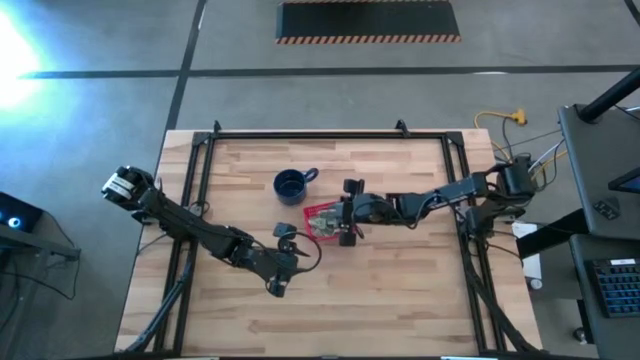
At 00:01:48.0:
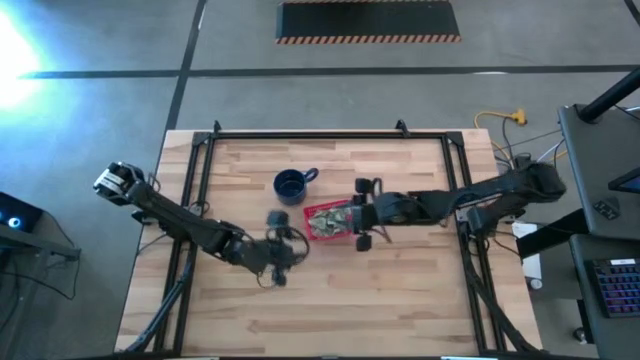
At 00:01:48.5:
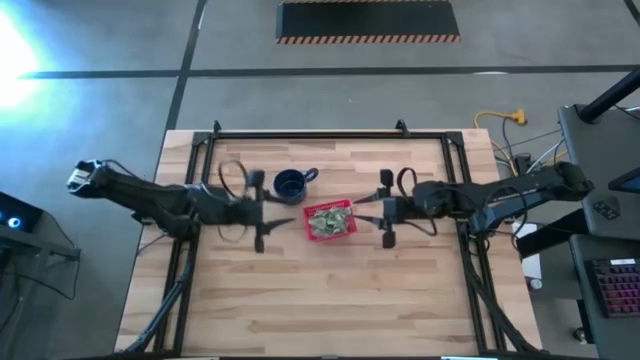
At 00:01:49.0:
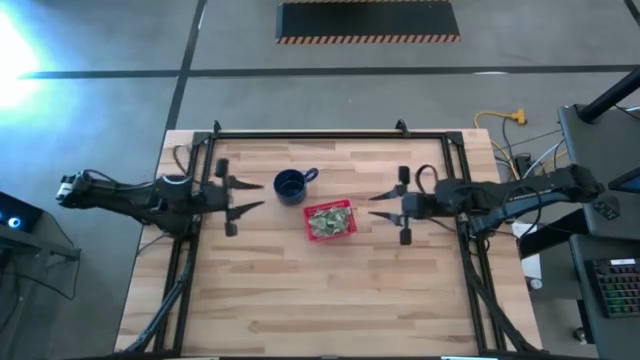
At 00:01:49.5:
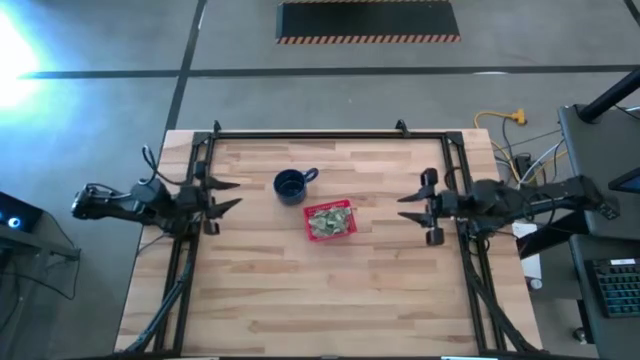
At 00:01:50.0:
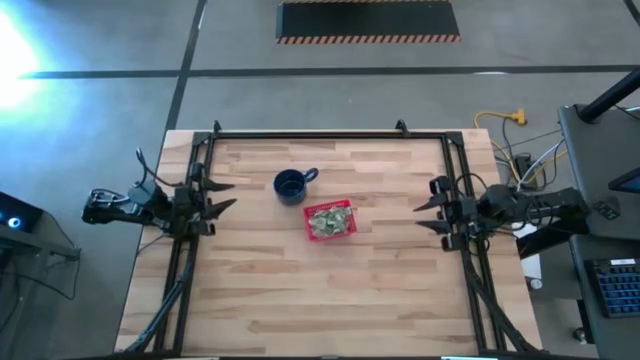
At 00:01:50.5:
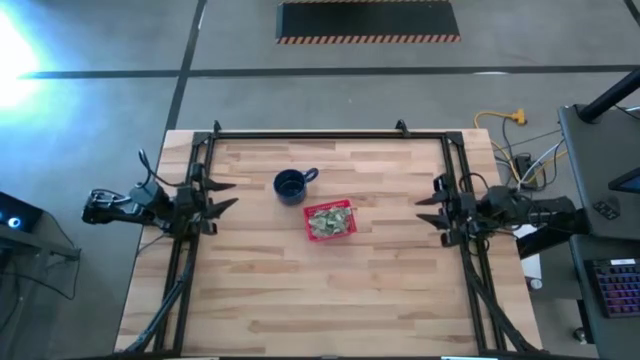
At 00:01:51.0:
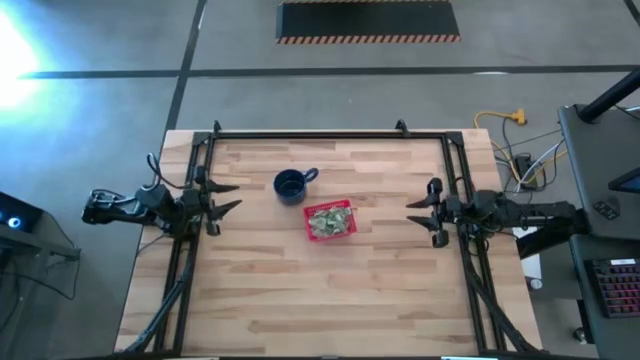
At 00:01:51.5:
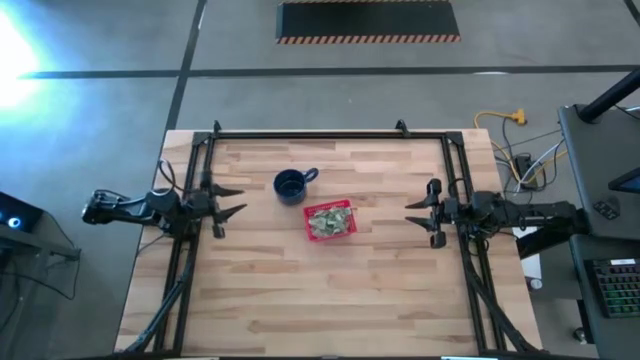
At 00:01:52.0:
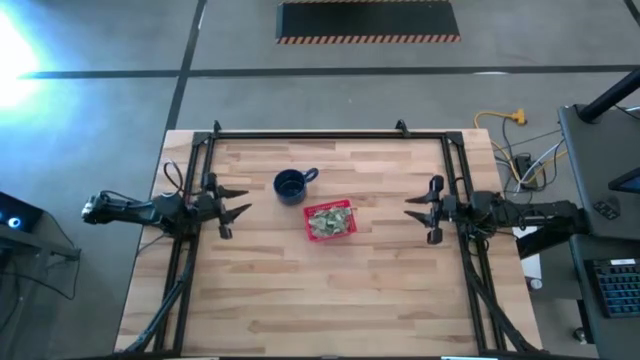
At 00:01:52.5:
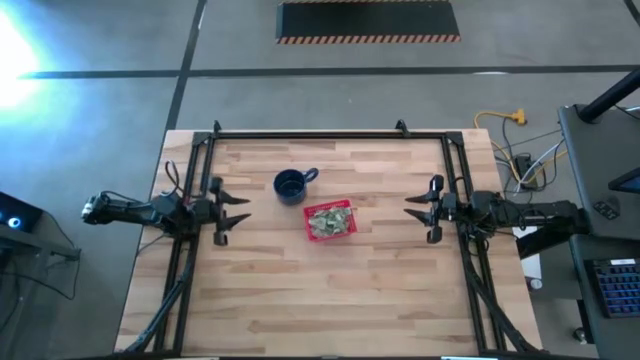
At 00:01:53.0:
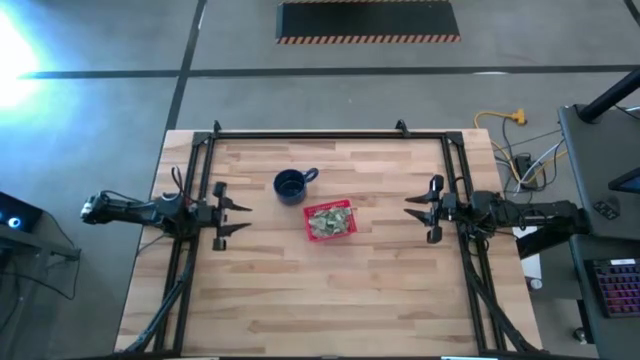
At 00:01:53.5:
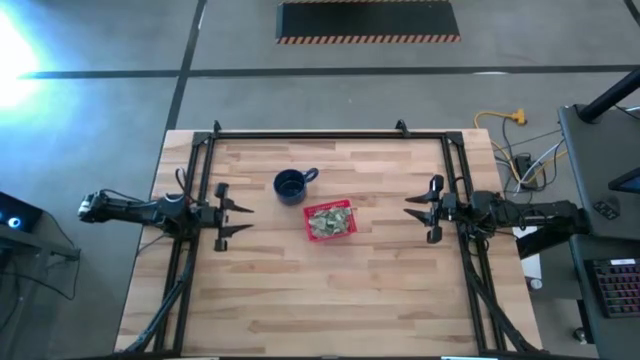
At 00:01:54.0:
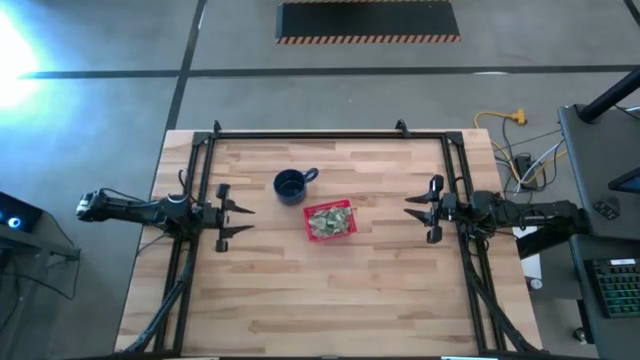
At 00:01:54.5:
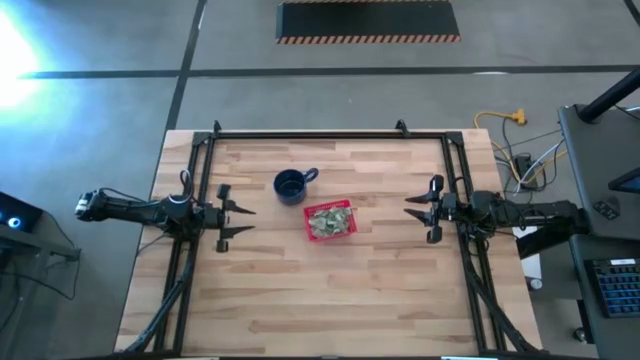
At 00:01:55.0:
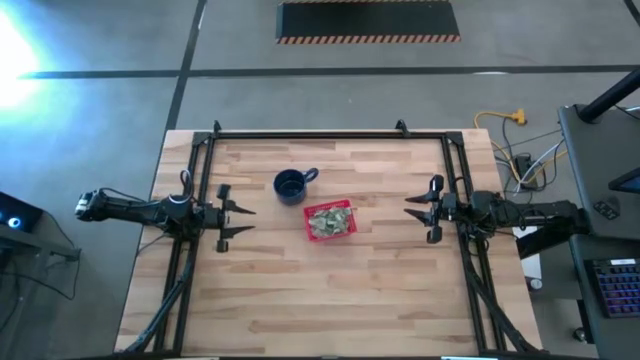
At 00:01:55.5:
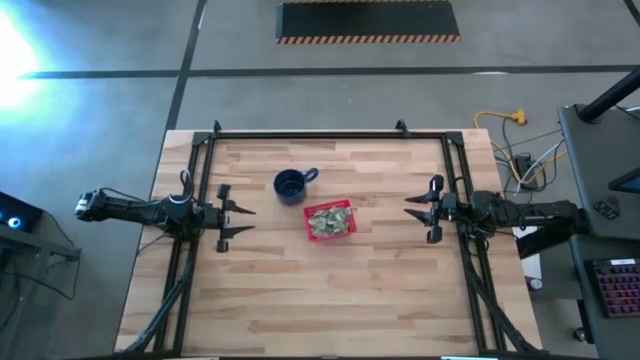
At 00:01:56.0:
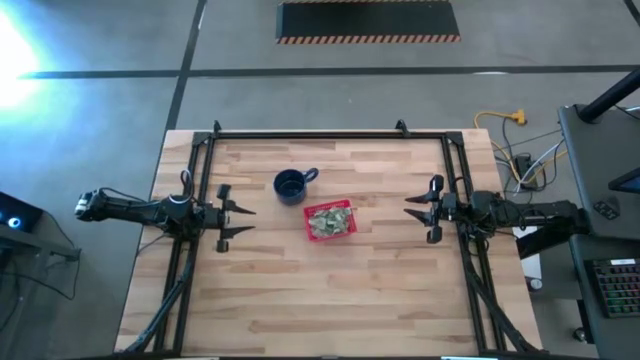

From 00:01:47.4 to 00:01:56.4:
Task: Pick and place Stevia / Truvia into bins
Return to Home Position

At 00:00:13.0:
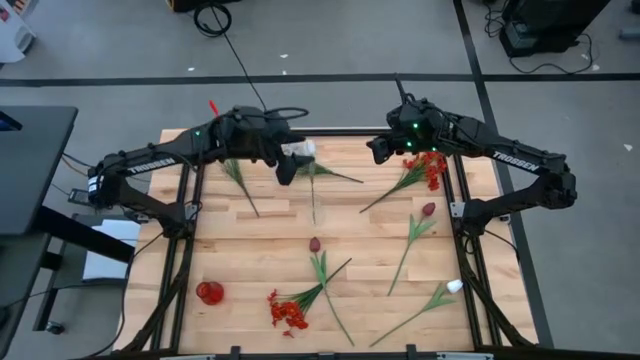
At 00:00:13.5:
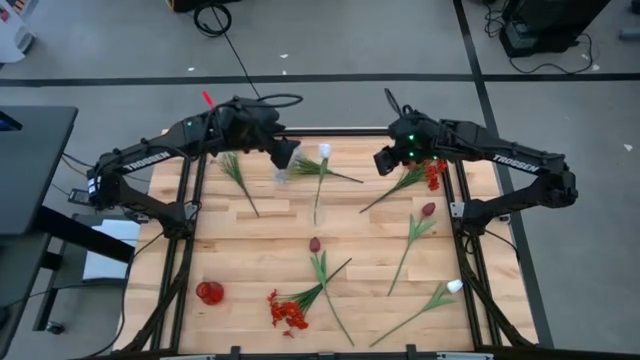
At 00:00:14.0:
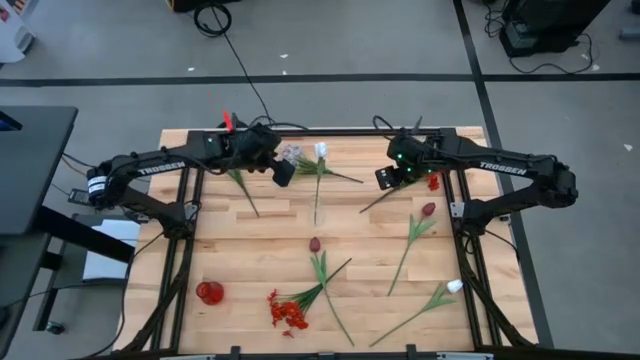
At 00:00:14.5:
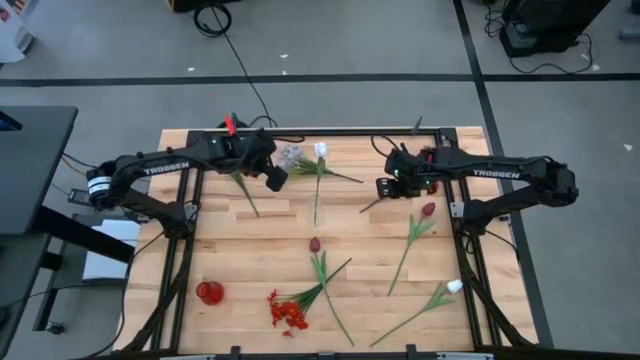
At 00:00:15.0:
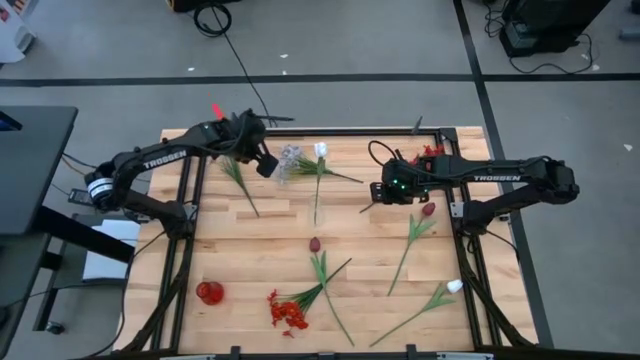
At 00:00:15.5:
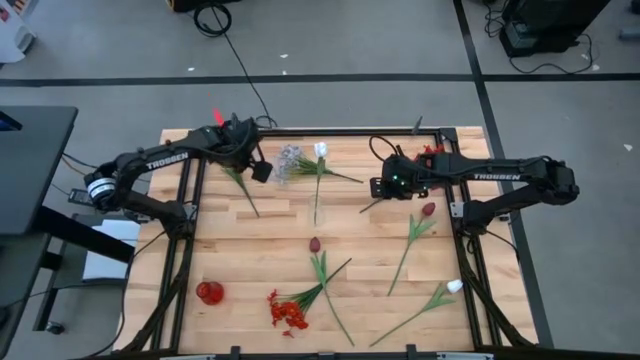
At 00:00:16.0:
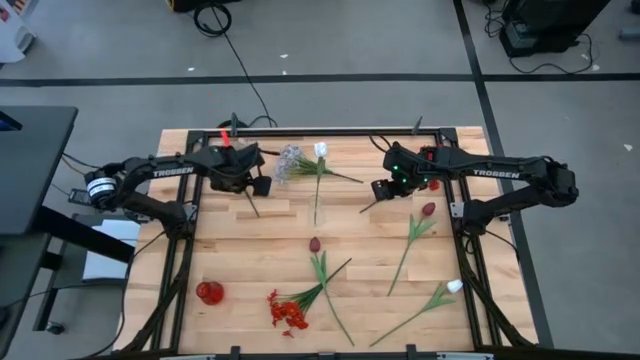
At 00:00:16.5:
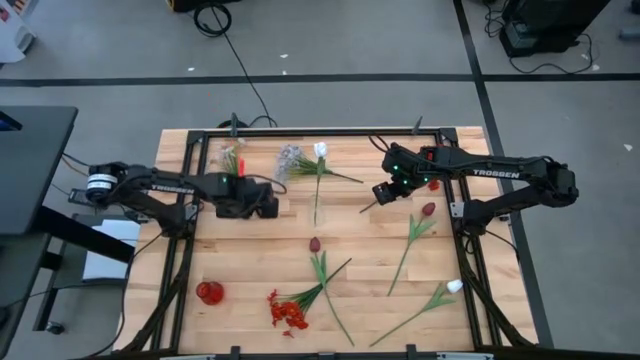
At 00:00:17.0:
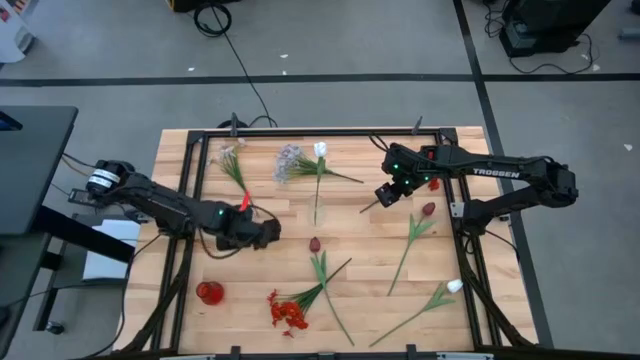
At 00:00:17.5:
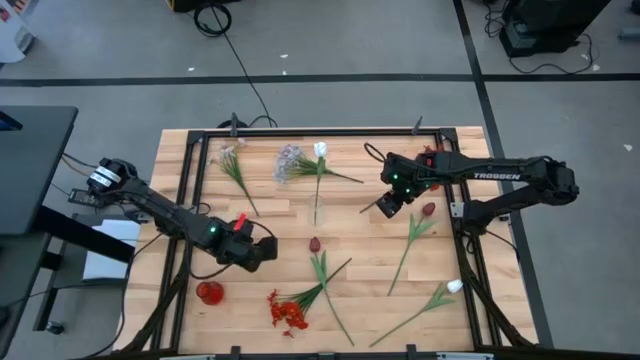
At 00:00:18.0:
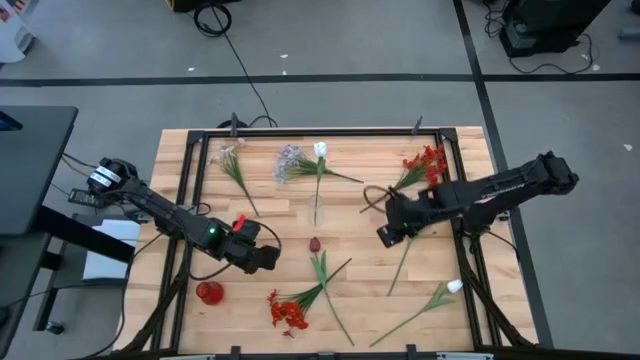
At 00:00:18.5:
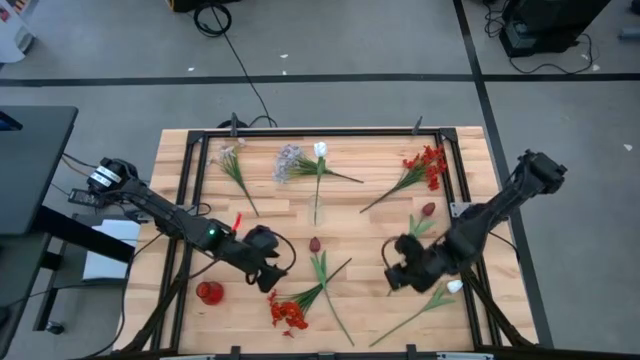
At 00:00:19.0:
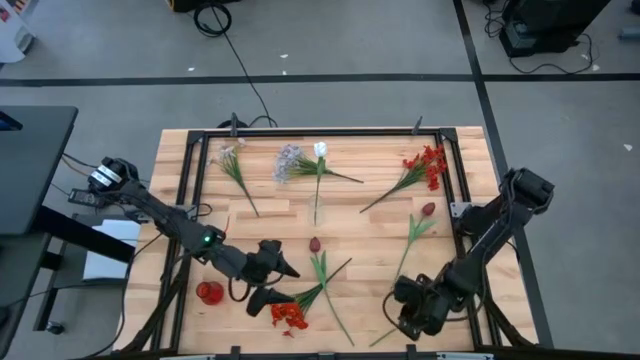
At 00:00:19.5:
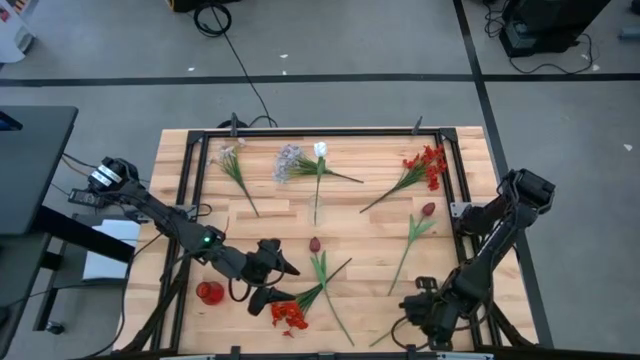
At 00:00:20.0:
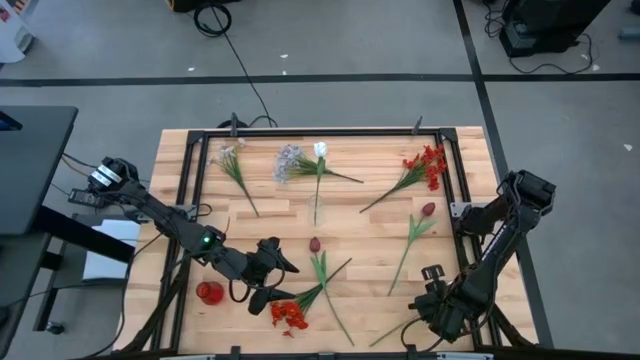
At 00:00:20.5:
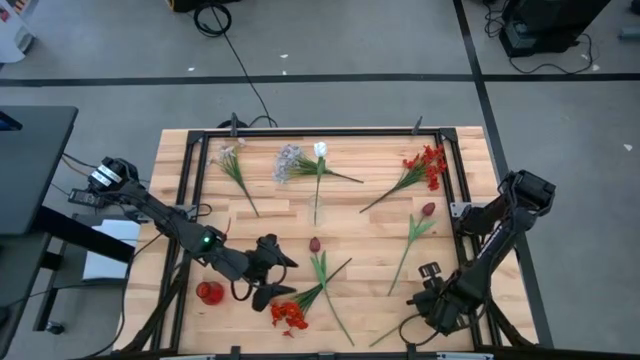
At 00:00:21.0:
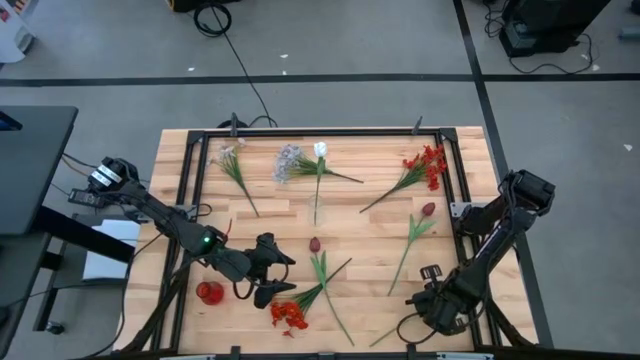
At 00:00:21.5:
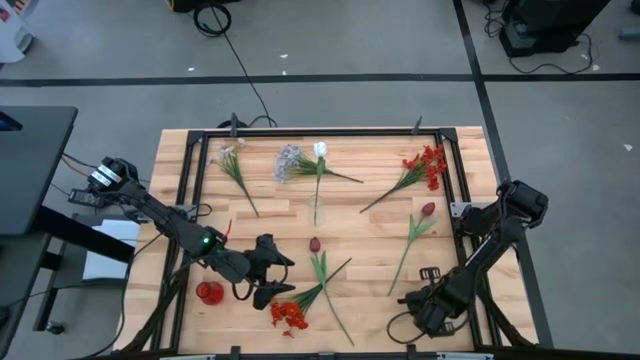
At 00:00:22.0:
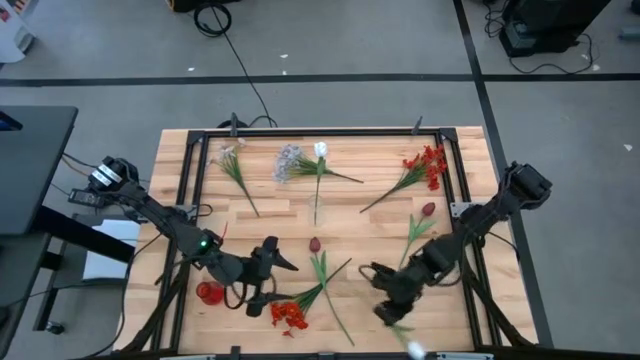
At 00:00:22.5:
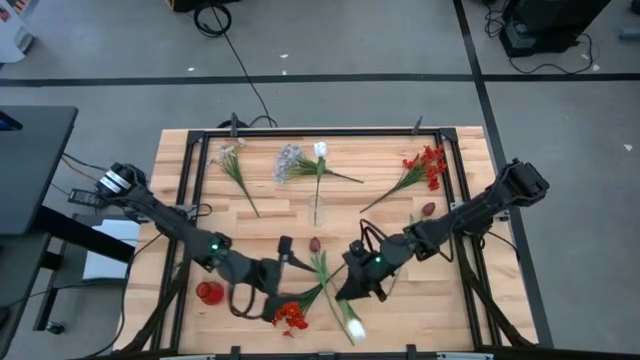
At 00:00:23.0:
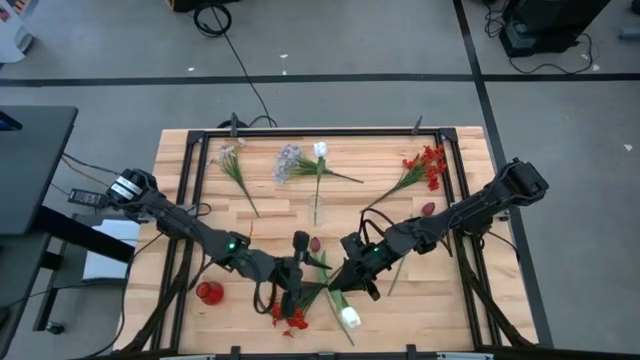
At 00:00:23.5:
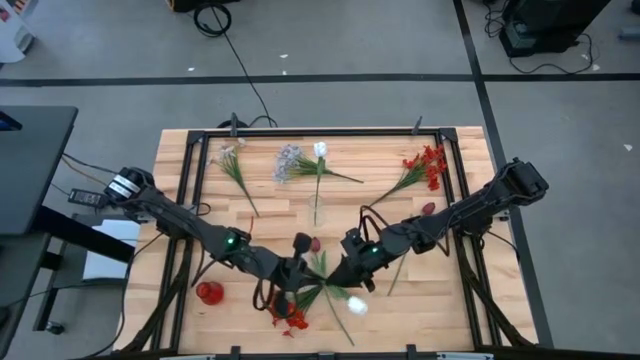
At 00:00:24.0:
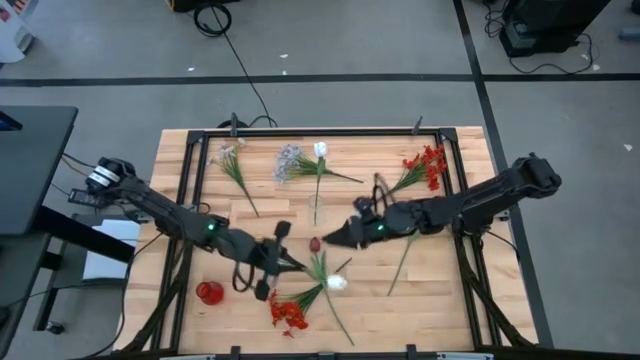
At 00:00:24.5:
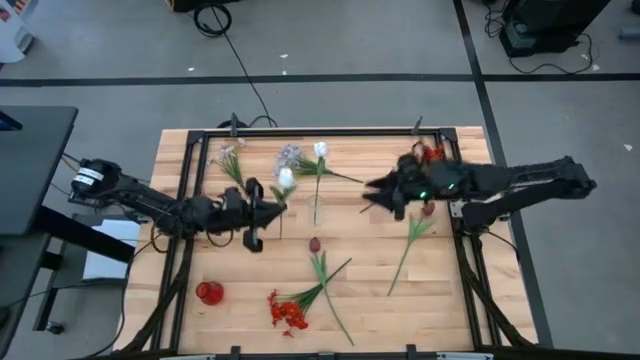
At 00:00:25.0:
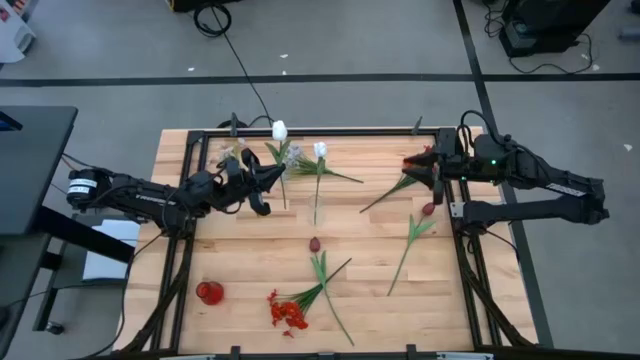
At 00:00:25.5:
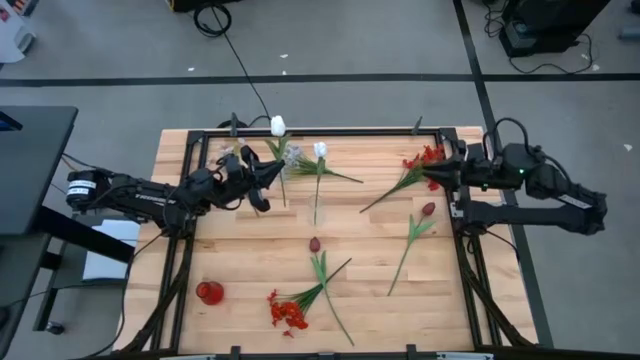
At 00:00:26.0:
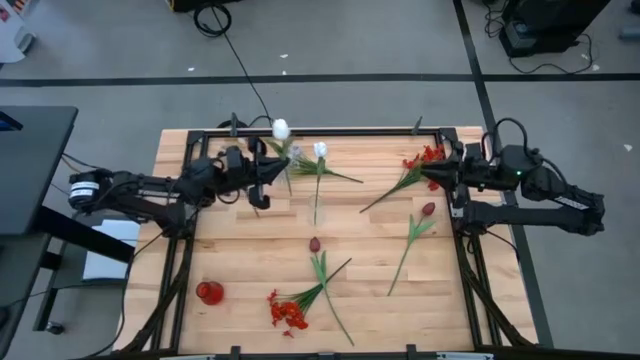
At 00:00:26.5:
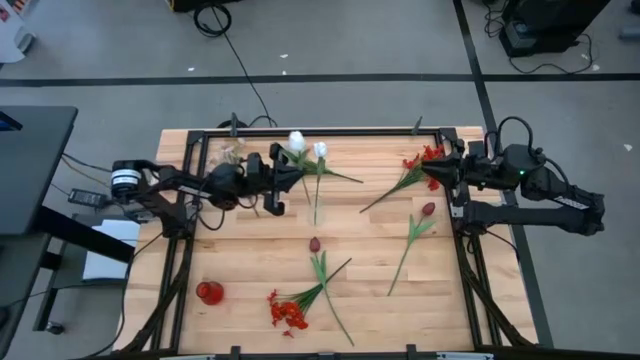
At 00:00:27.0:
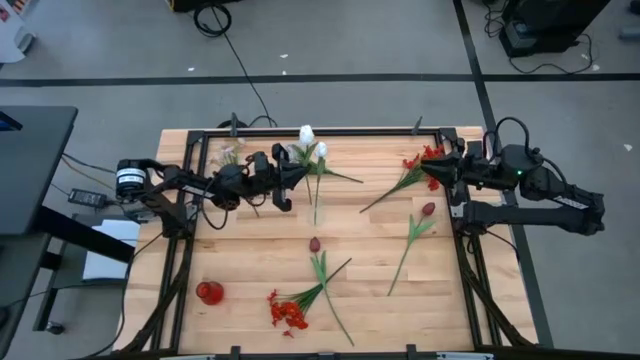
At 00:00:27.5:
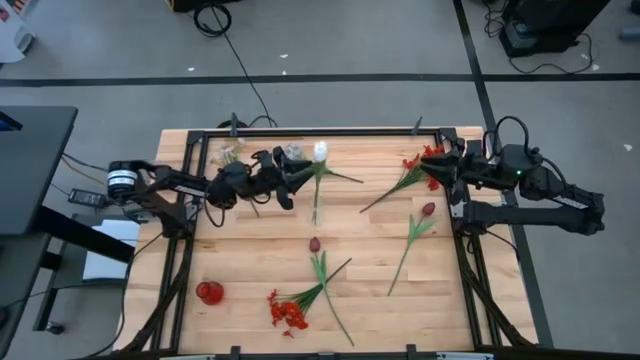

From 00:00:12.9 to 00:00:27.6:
Task: Sort flowers into vase by color
Put the white flower into the transparent vase
